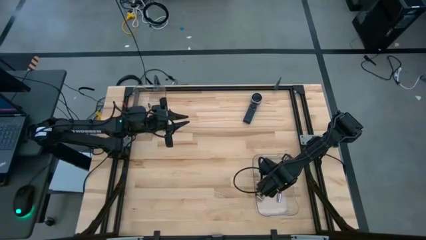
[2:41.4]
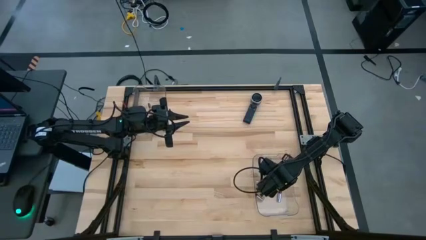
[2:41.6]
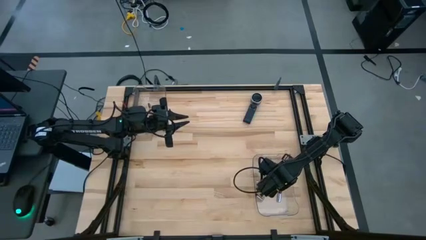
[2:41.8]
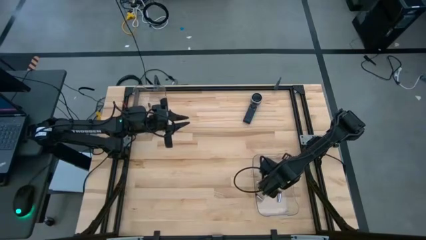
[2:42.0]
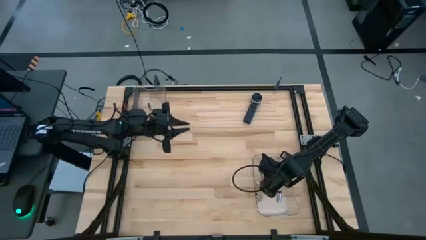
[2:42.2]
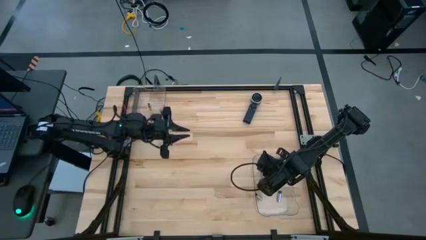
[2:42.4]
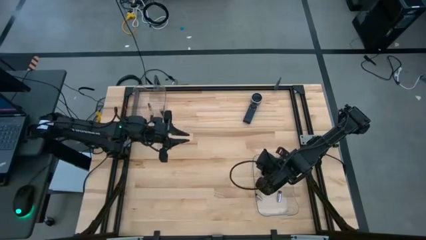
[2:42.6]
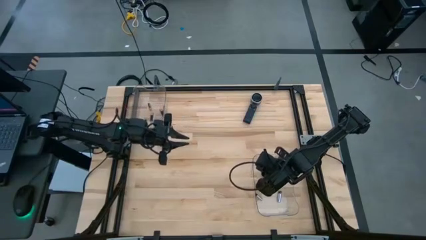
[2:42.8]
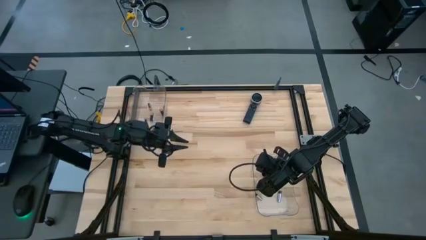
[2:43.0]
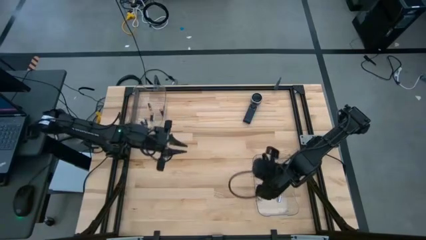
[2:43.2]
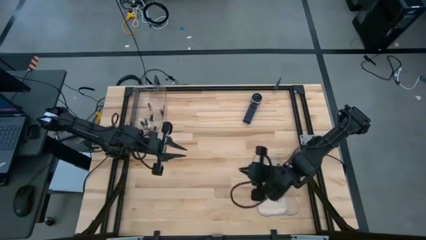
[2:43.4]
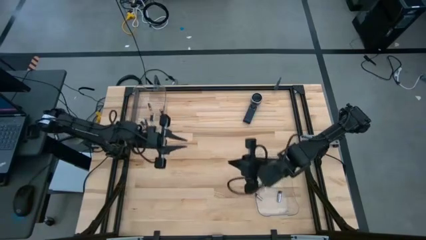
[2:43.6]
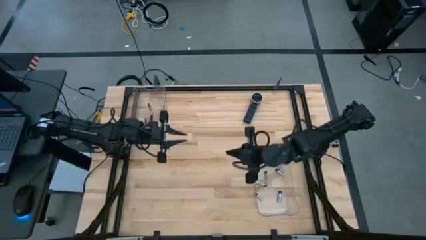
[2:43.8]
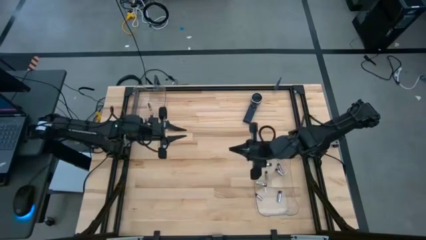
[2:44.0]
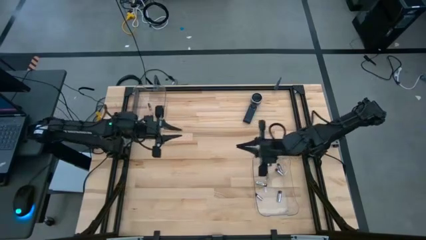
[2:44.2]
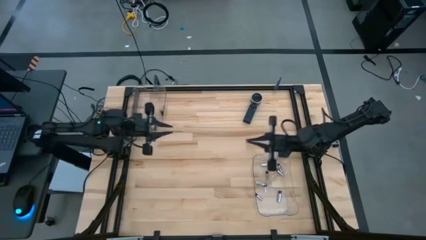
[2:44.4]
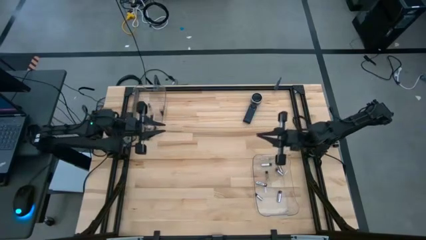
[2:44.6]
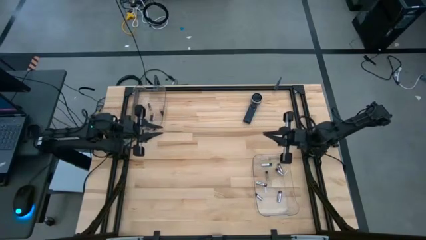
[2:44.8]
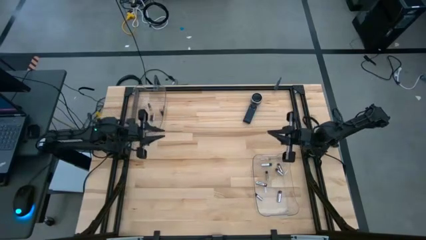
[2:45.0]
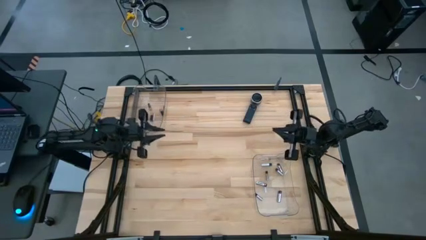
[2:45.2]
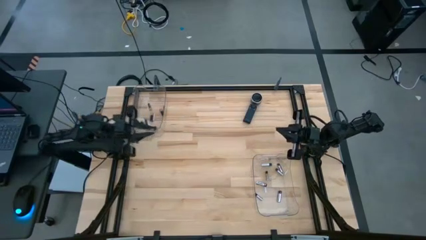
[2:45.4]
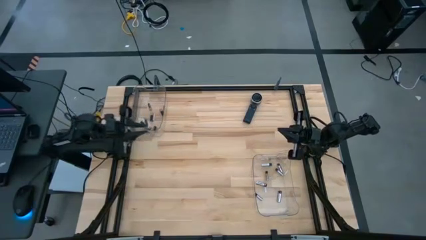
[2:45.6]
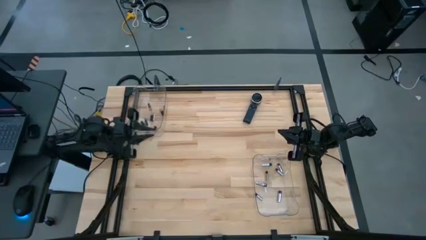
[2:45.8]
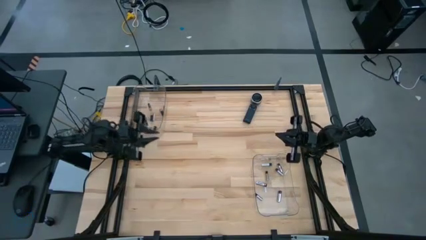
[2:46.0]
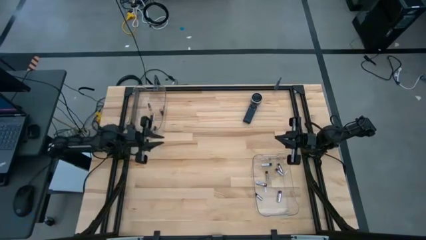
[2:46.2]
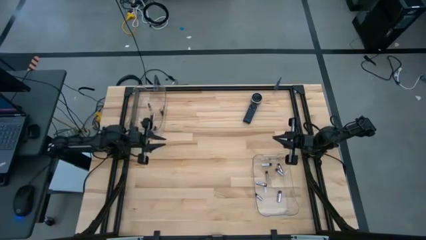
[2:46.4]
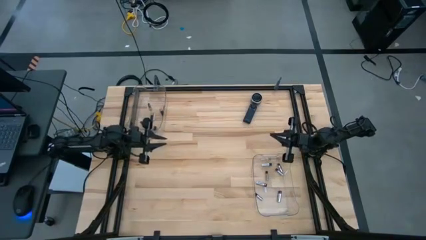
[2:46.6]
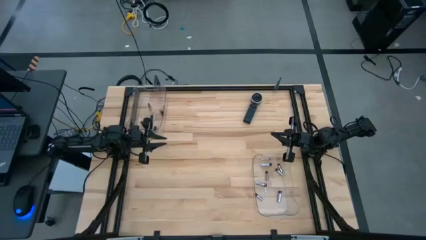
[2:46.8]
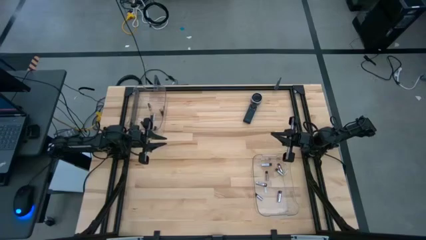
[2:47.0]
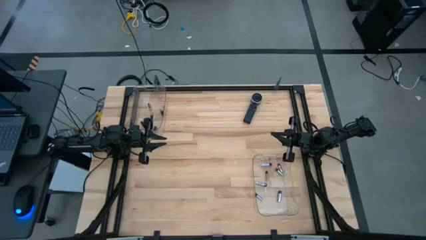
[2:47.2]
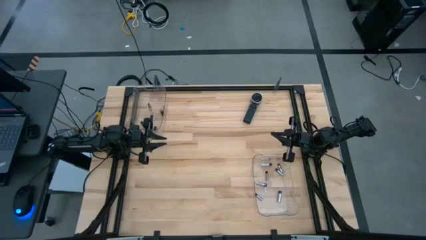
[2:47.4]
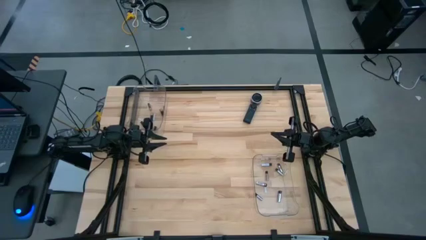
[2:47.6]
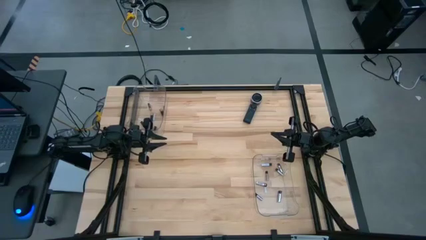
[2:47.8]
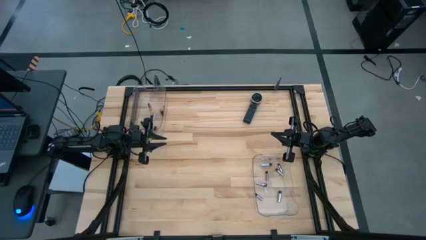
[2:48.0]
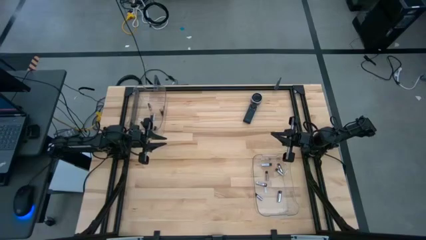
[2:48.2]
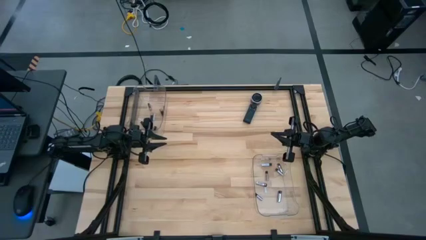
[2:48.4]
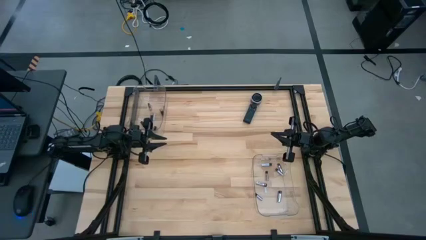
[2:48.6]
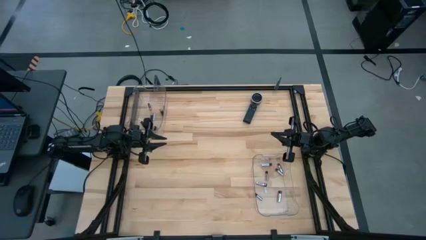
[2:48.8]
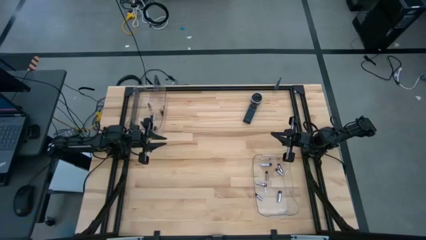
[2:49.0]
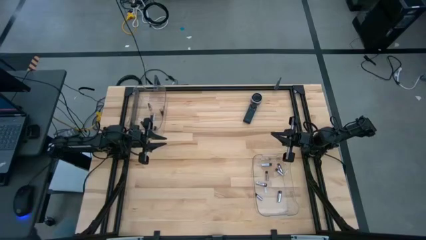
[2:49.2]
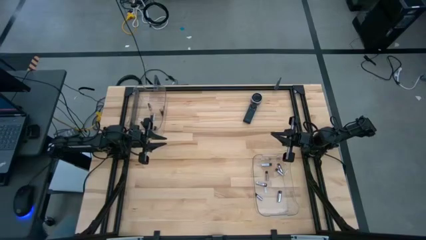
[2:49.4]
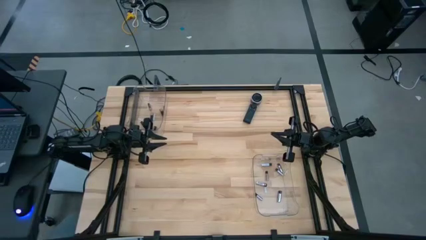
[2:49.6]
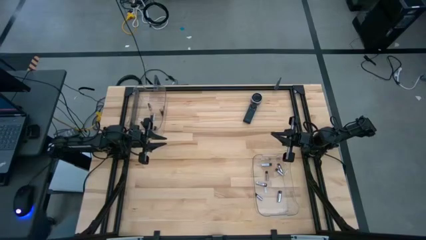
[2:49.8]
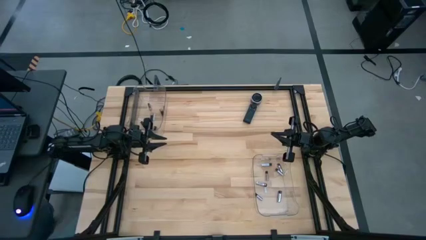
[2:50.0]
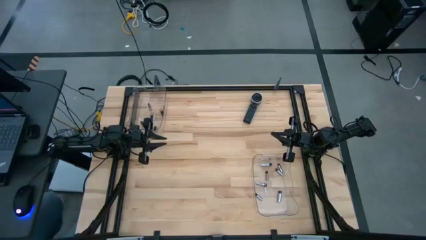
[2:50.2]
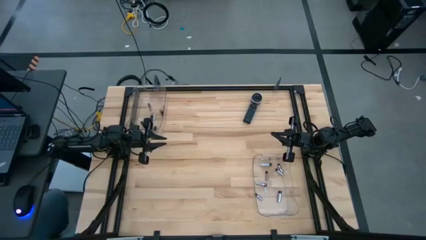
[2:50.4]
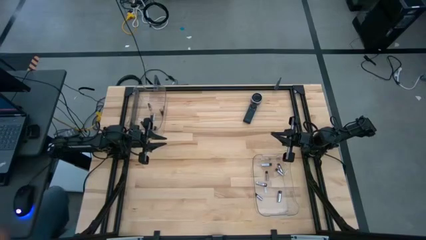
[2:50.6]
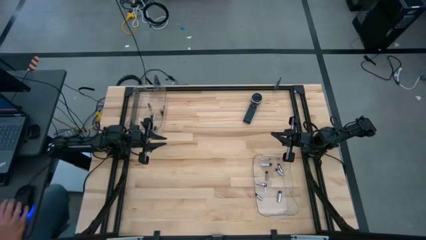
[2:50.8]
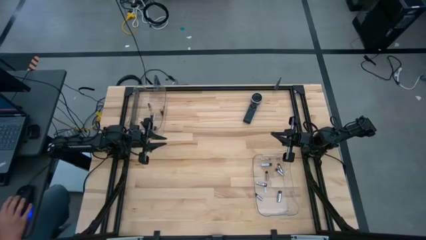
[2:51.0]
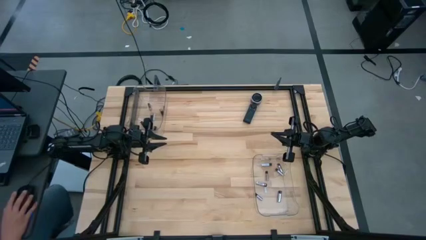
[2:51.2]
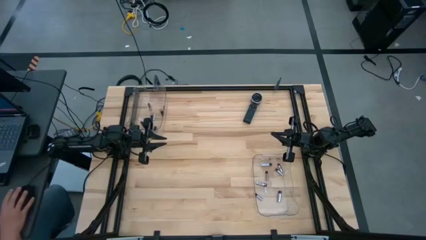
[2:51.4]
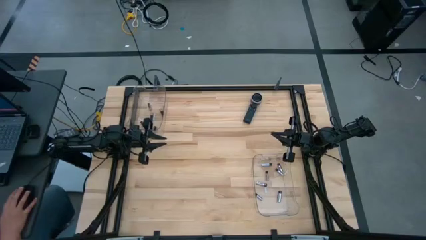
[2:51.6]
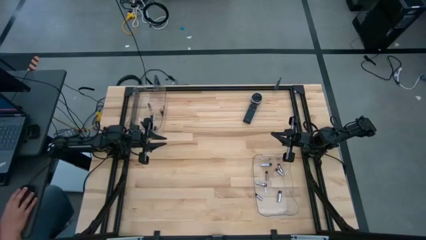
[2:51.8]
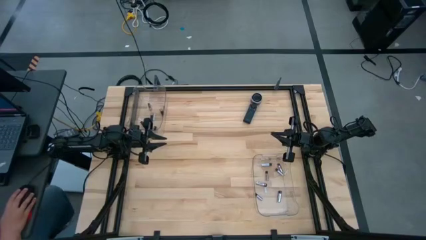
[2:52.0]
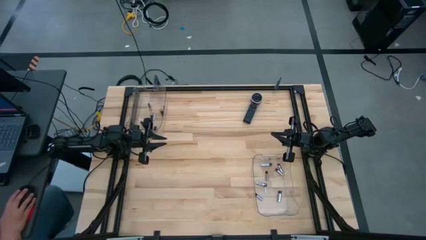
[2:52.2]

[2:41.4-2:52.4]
Task: Sort batteries
Return to Home Position

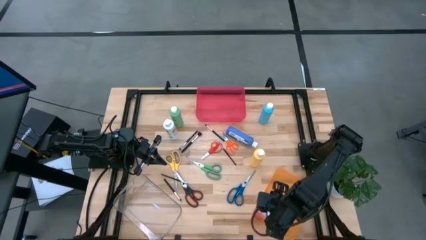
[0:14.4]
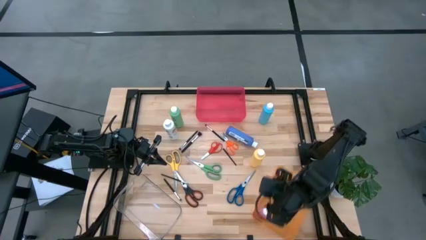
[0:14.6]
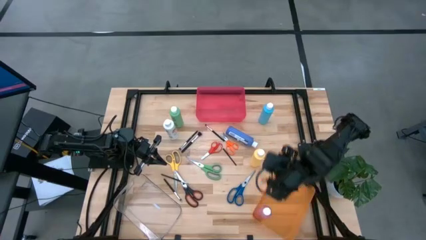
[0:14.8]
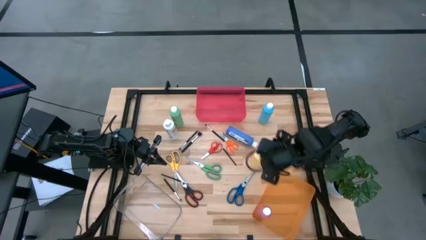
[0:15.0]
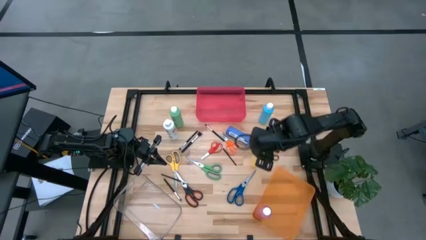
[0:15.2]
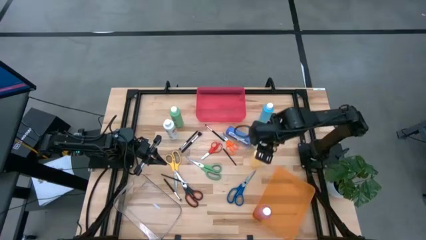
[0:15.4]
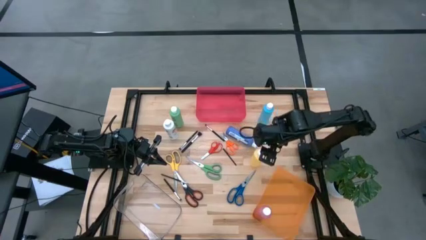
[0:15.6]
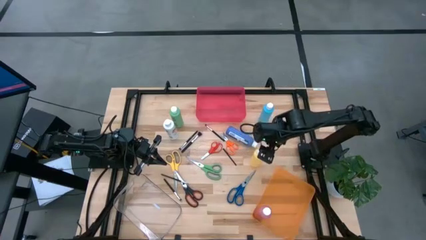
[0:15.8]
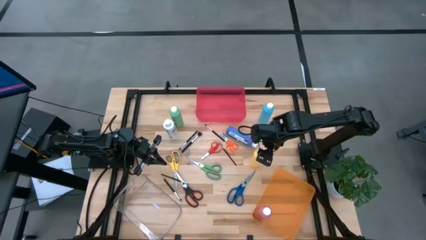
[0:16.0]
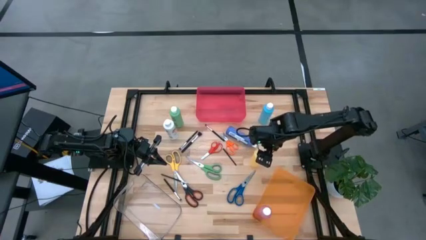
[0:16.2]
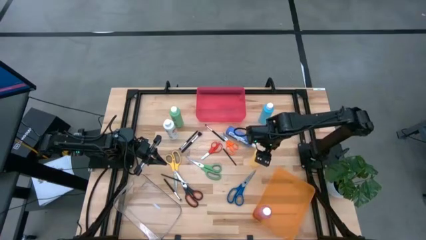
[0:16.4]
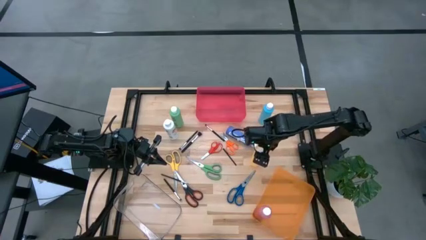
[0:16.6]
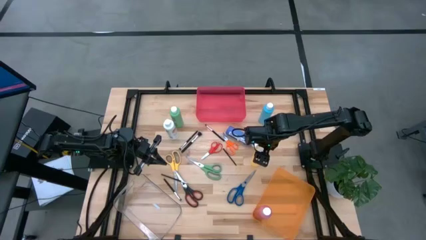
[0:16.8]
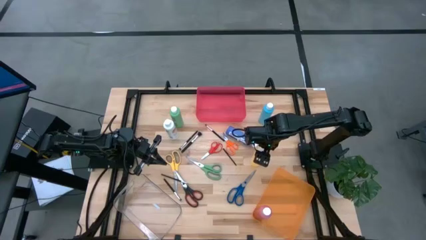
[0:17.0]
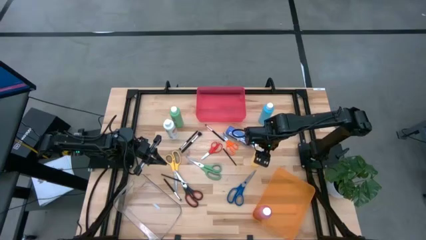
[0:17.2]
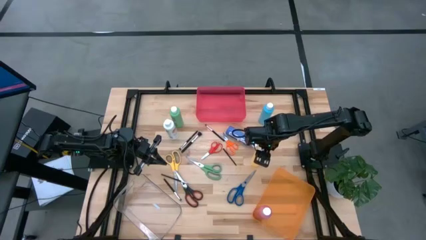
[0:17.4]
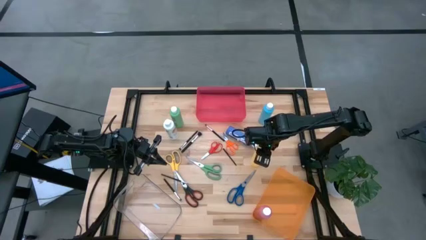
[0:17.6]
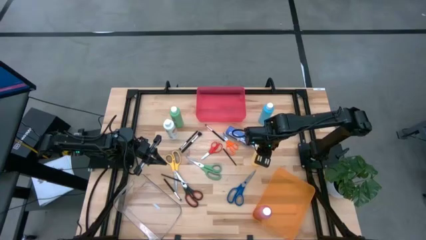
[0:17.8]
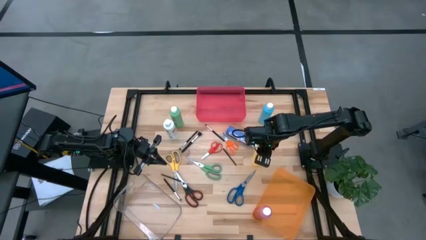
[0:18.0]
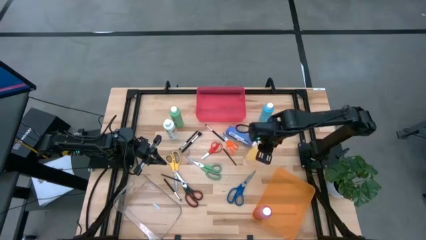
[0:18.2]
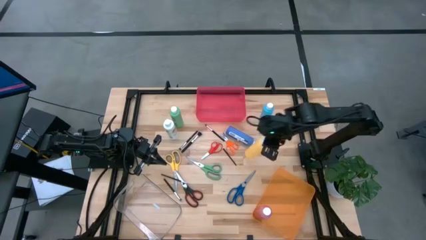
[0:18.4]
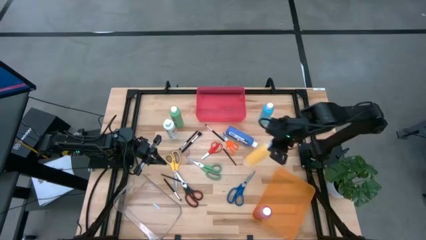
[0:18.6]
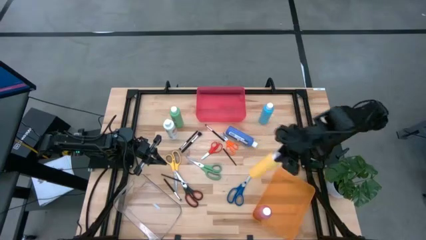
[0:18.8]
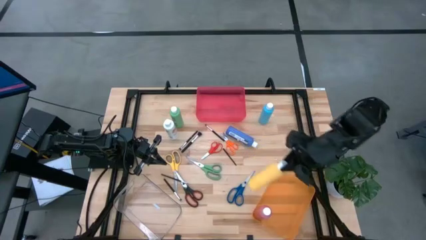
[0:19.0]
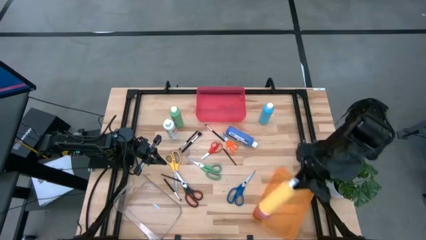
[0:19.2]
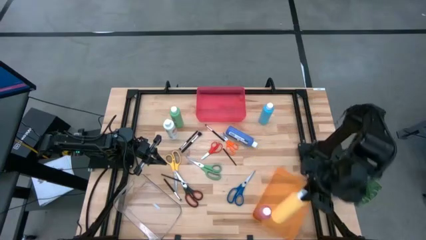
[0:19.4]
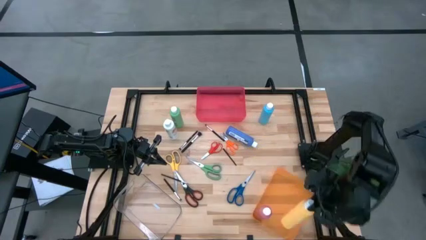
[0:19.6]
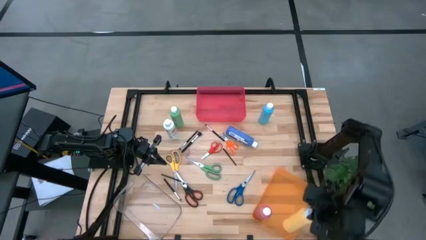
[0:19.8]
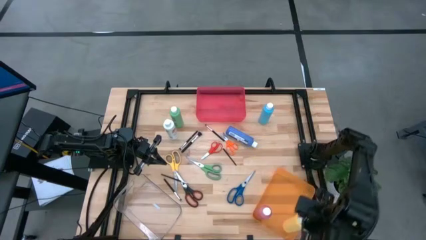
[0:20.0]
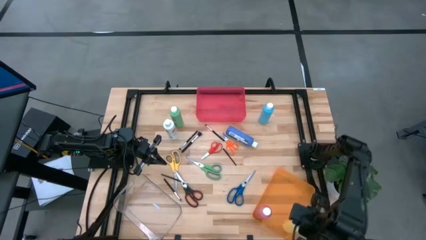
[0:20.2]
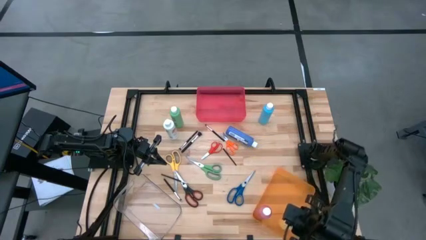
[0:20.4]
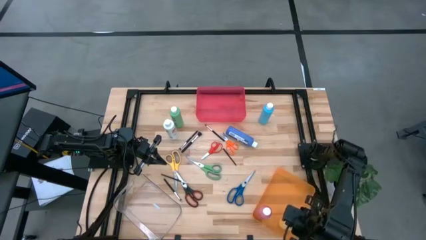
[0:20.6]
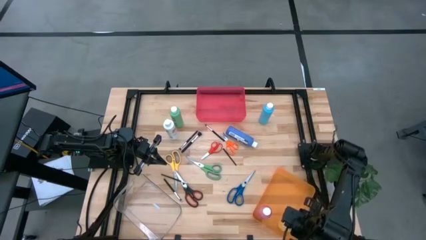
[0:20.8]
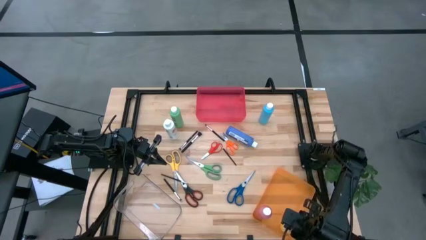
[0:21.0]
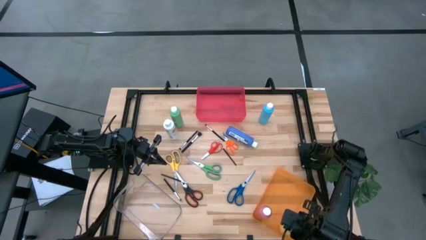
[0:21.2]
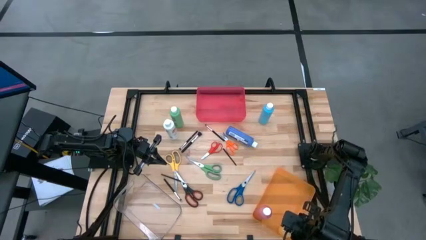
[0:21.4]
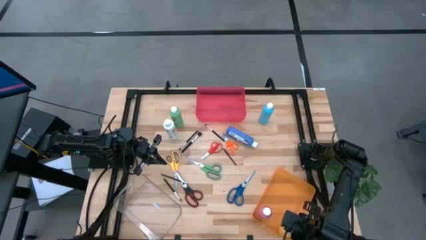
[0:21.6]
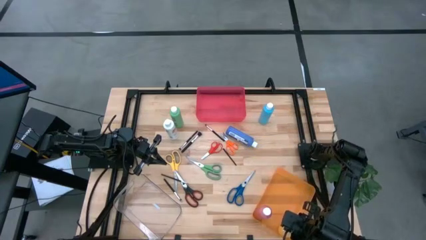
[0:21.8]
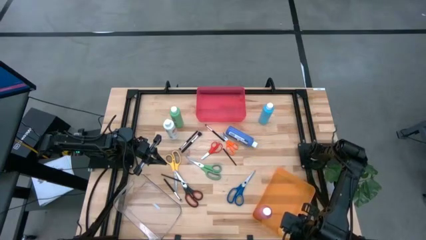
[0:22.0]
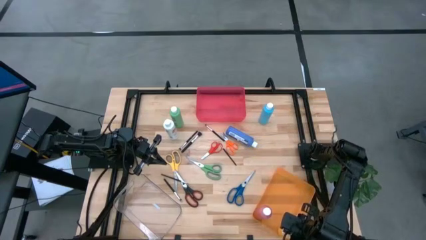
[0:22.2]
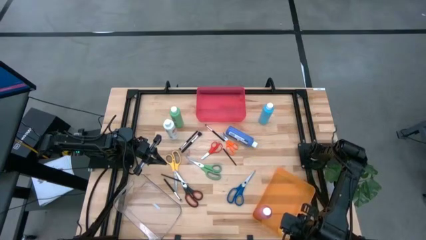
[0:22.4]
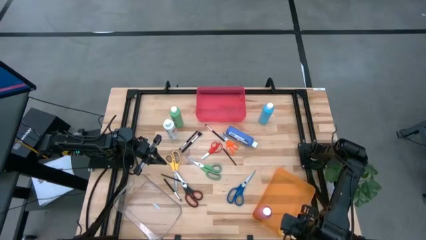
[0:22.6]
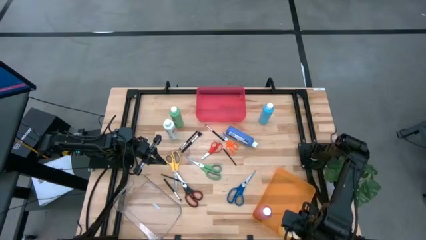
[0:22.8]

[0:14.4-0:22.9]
Task: Pick & Place Paint Supplies
Put the yellow paint bottle into the orange bin
